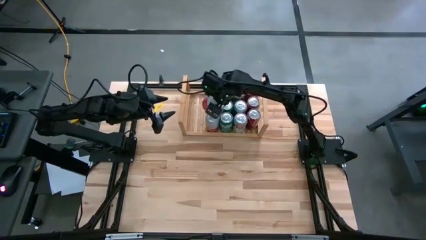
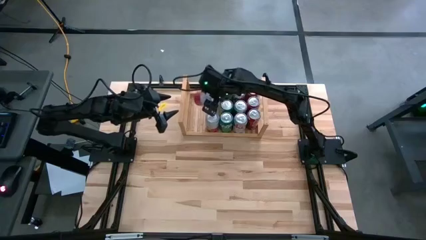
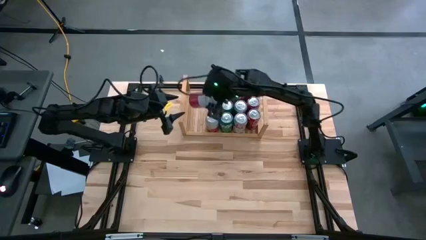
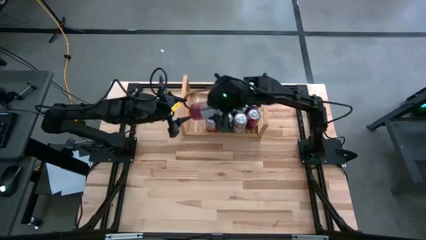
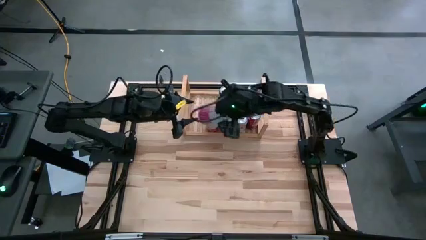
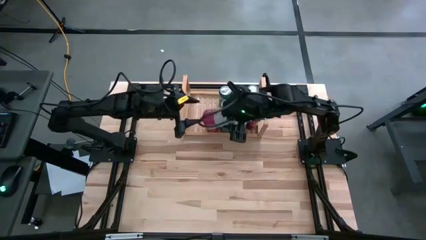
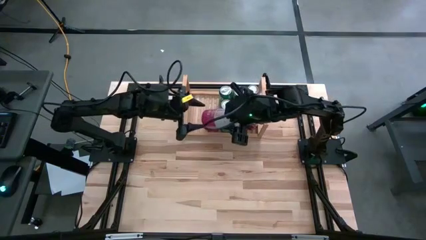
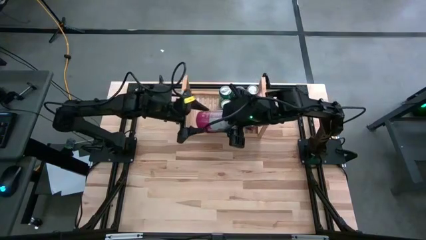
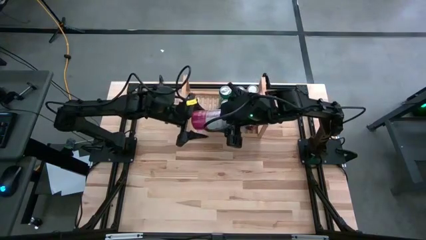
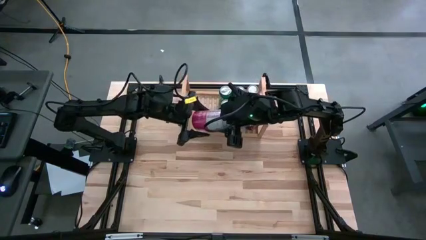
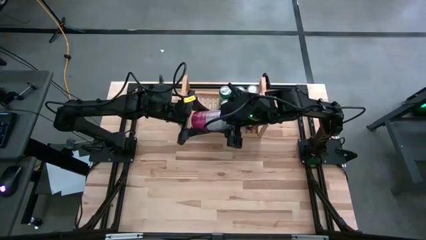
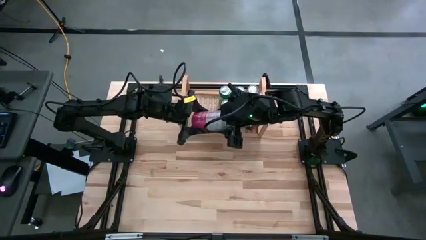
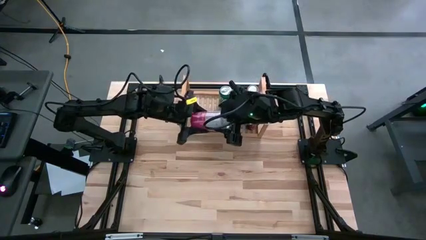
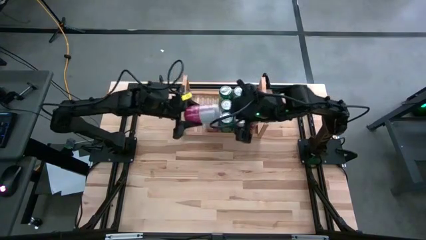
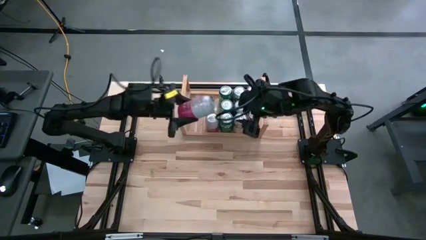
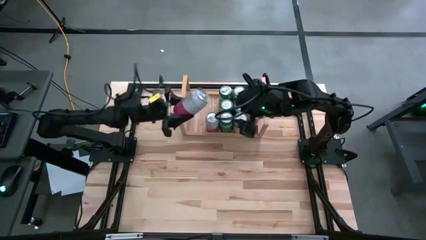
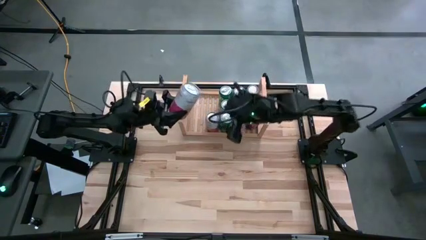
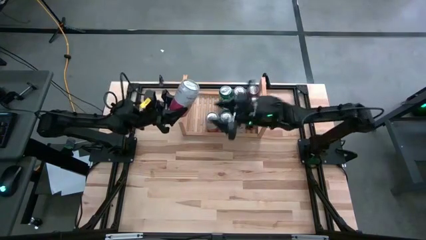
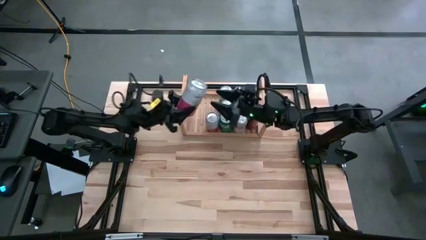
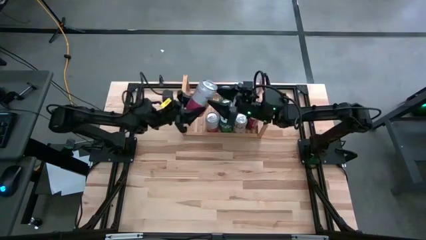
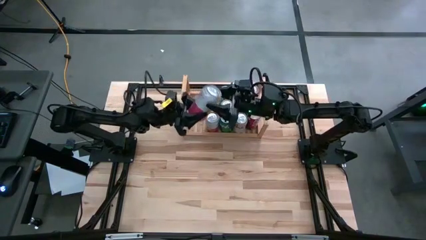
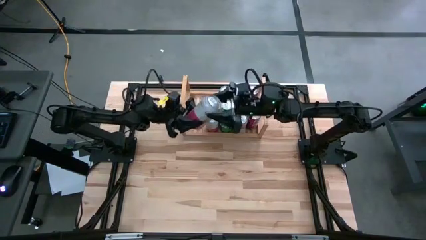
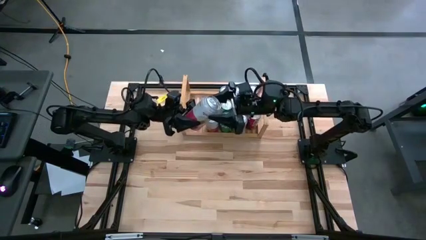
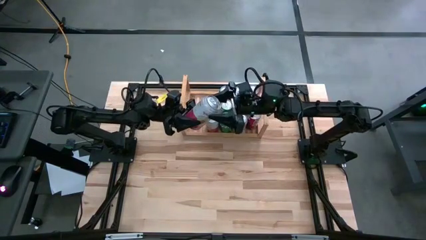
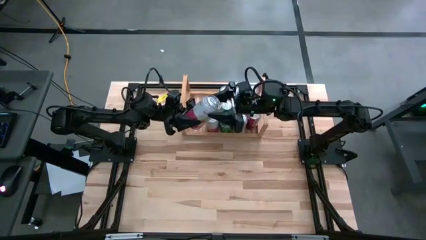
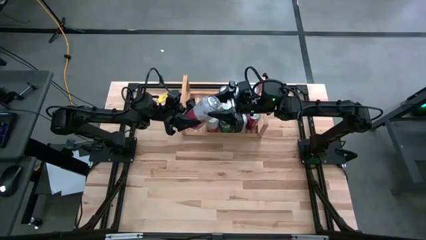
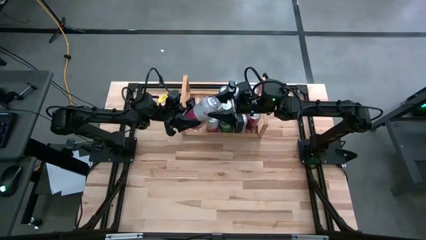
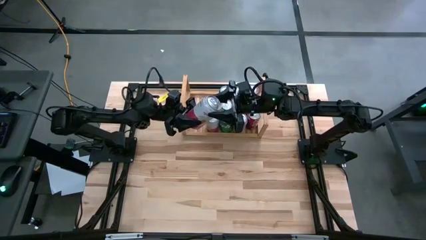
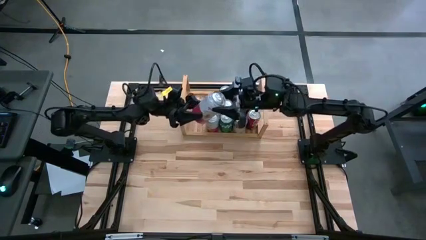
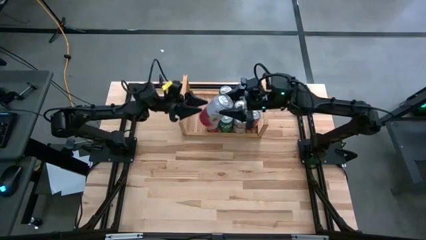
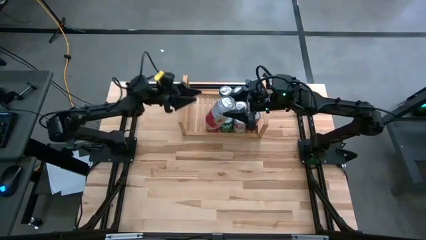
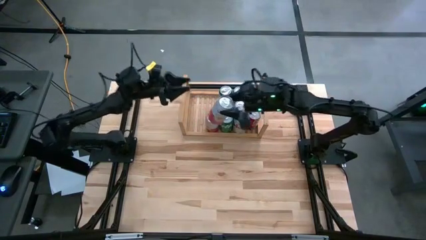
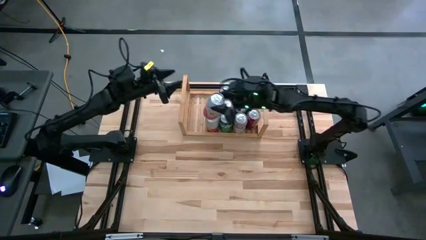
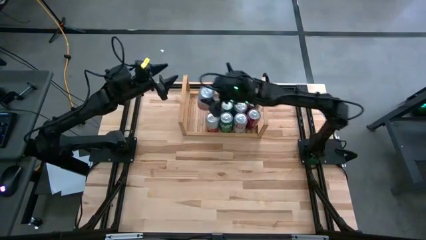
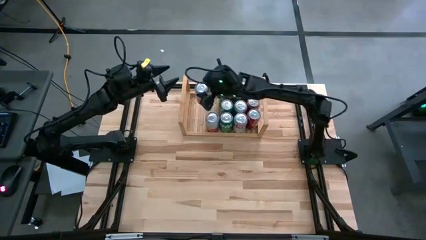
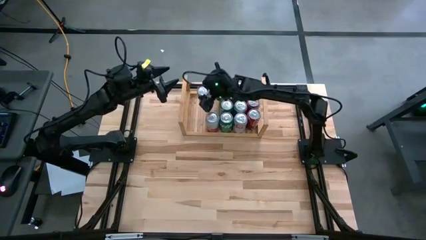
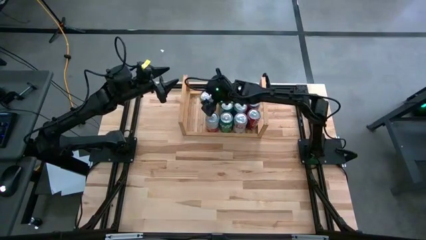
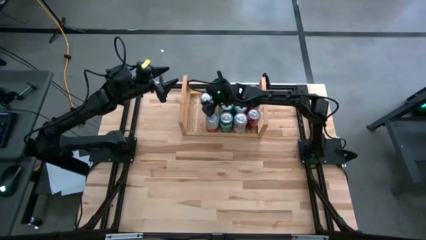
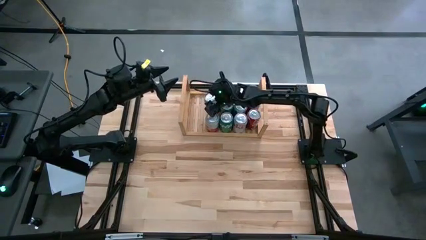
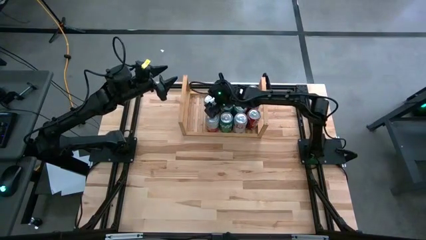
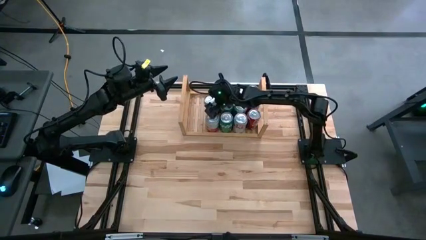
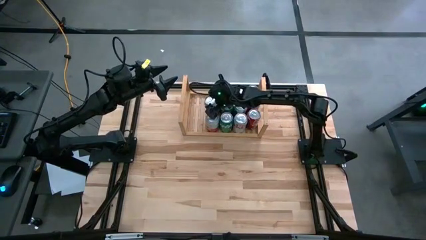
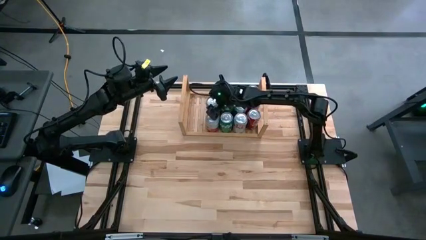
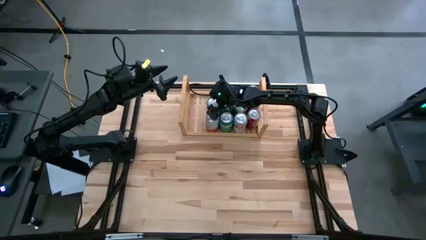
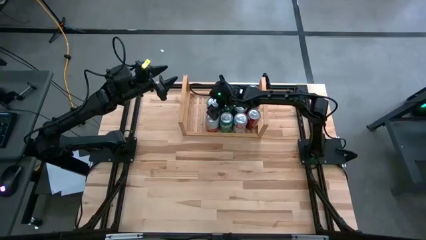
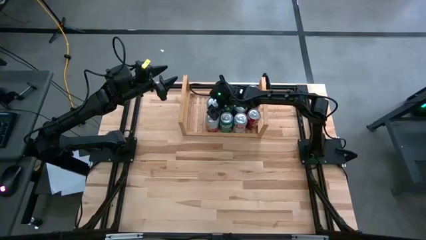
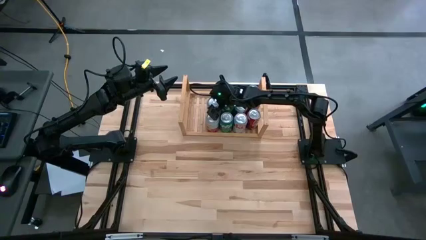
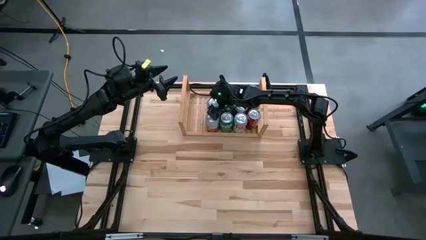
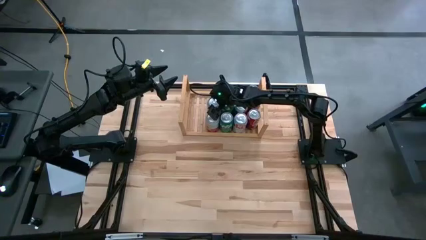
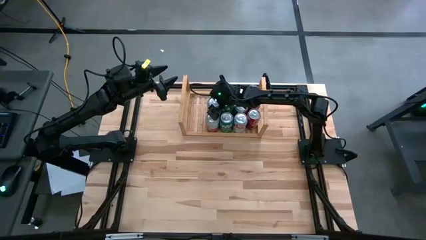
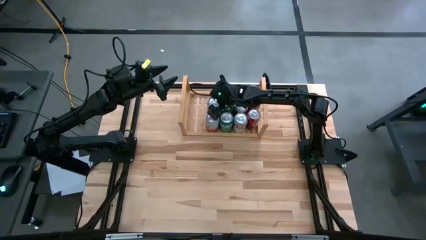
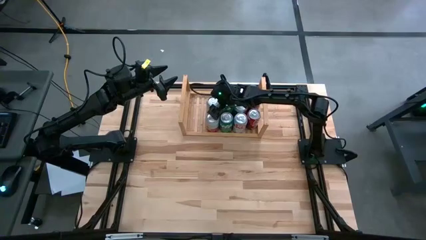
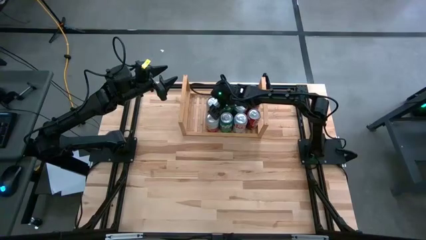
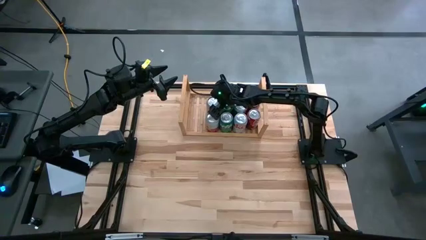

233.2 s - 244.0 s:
Task: Place canned beverage on shelf
Put the pink-white soda can aligned with the other pink-white soda can on the shelf

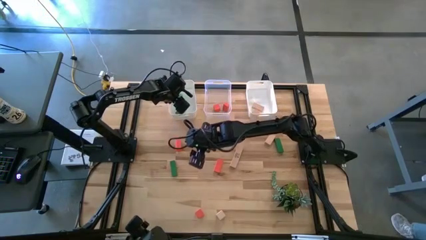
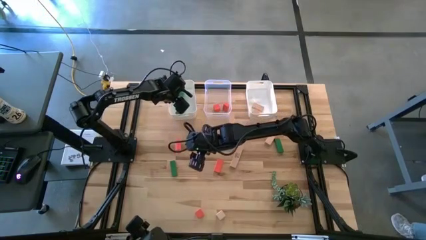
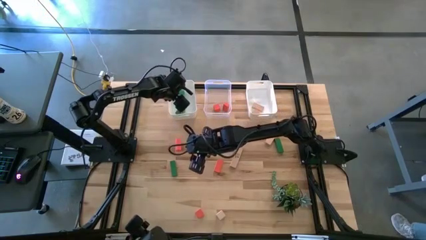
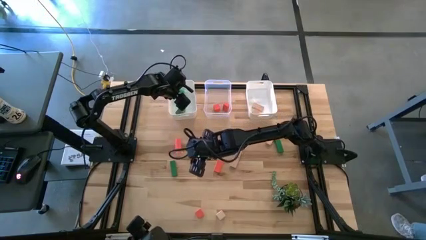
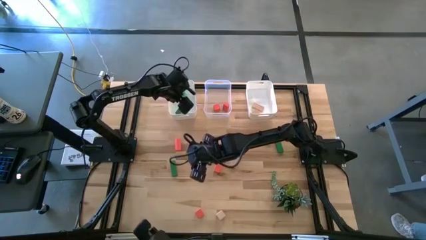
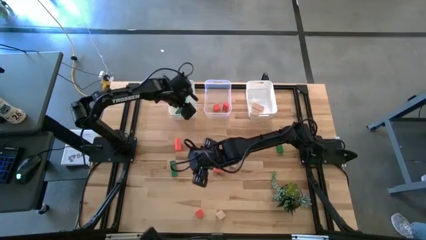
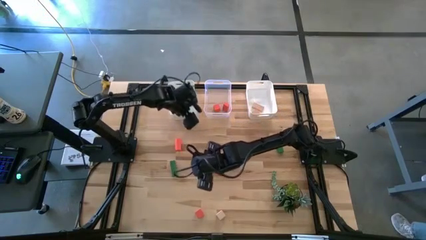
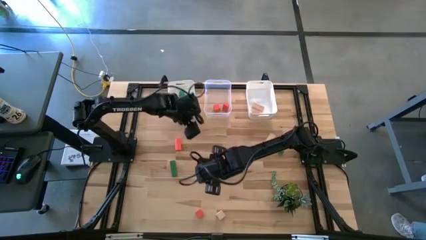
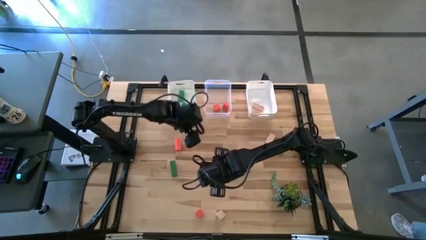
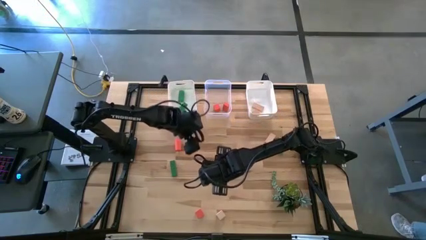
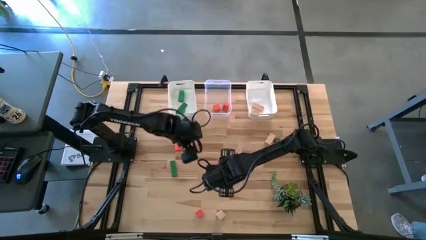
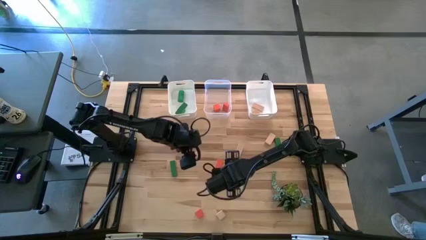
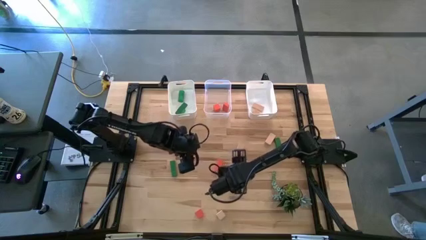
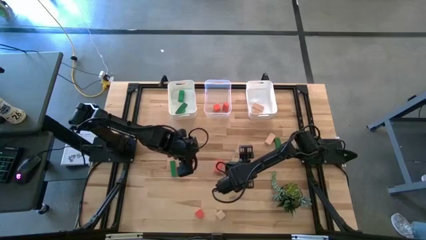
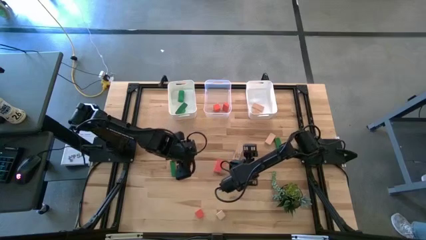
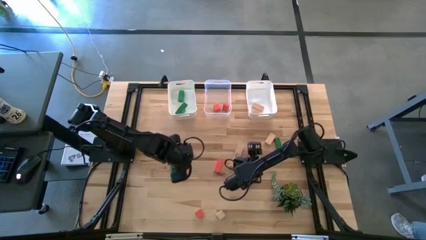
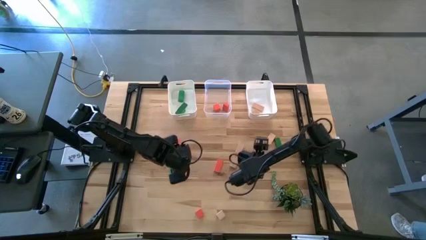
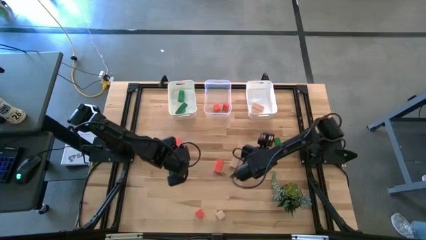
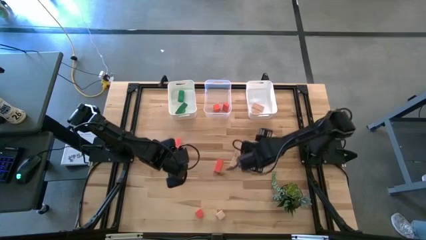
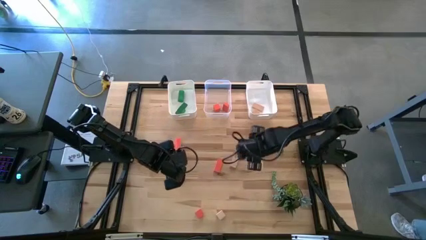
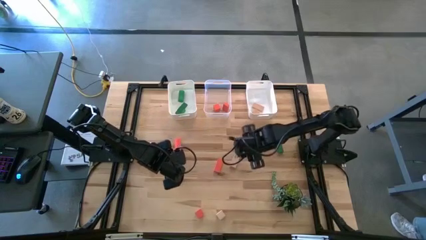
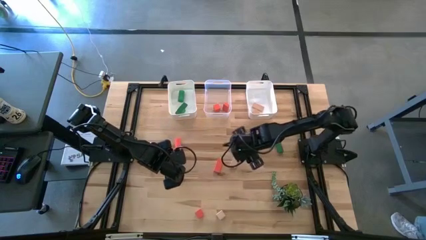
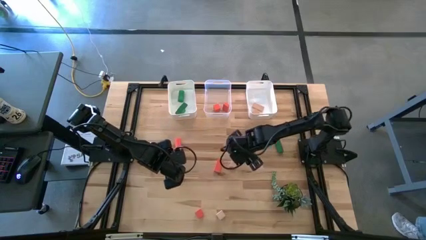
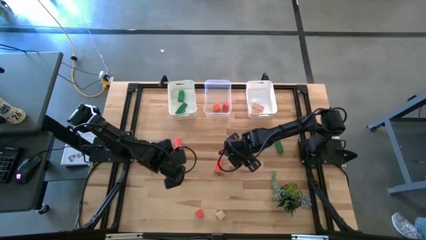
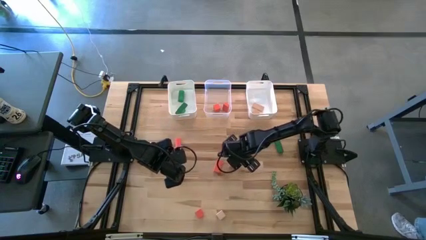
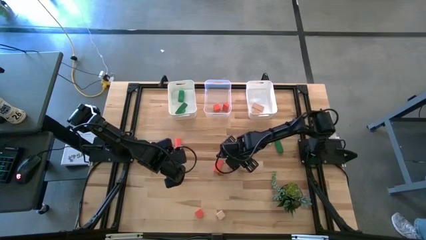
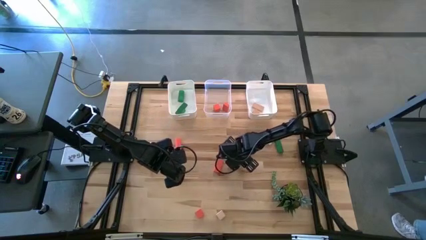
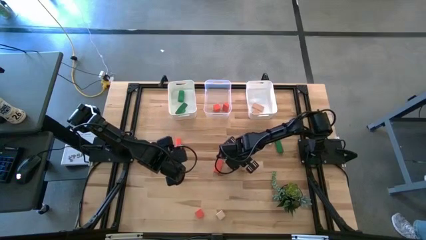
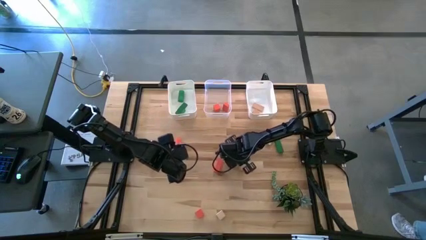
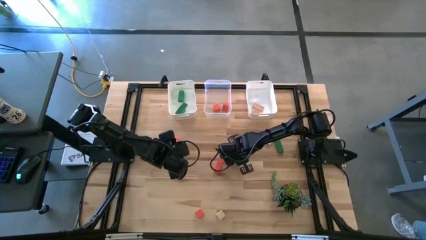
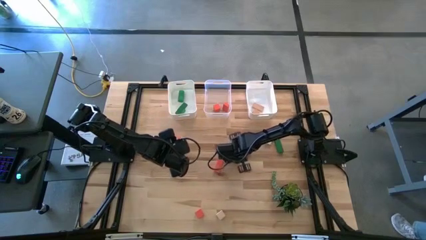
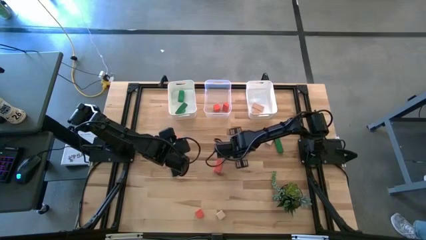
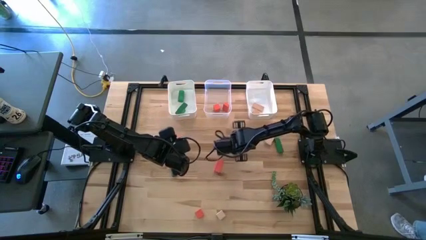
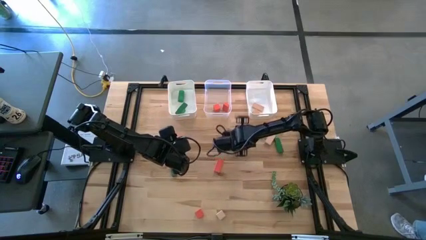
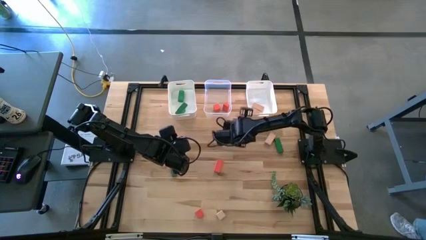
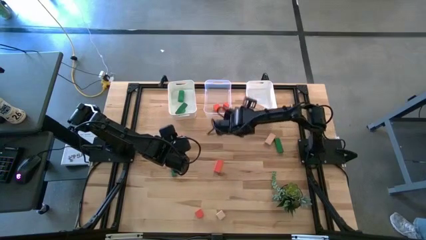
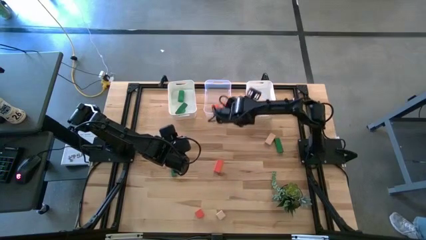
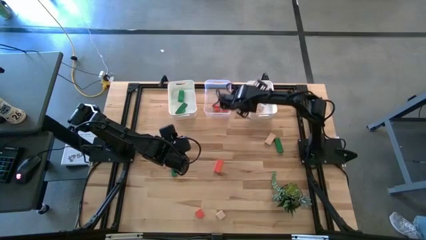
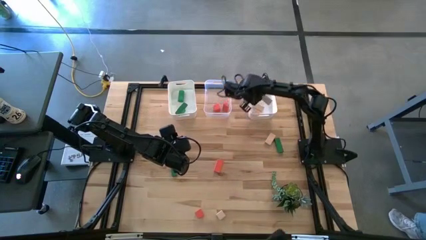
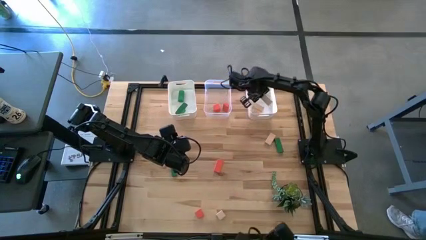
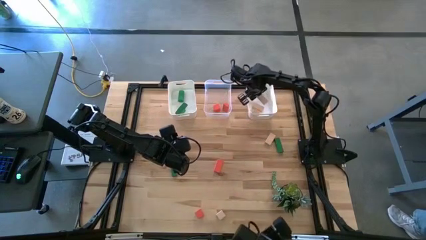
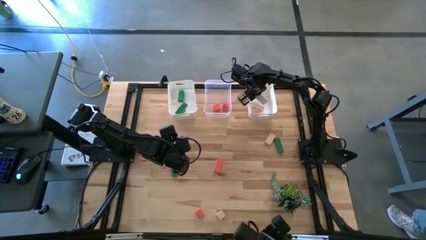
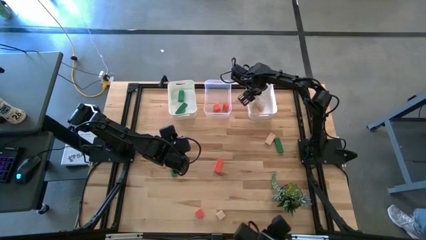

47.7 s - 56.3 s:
Task: Sort & place blocks by color
Put the brown block into the right white bin
